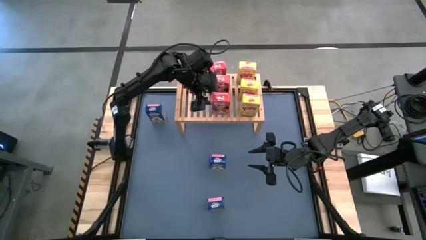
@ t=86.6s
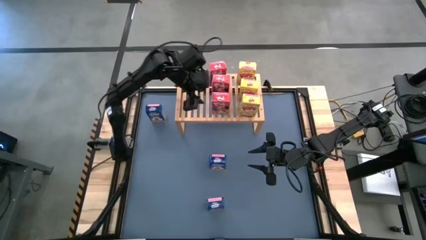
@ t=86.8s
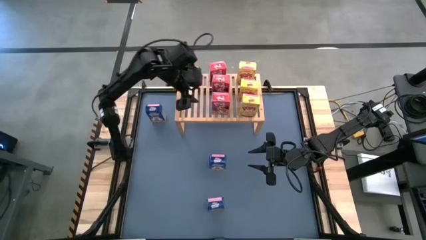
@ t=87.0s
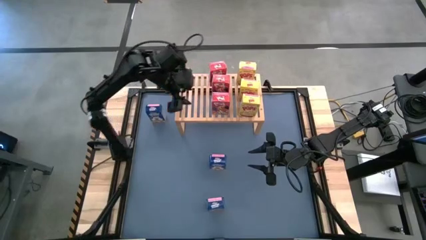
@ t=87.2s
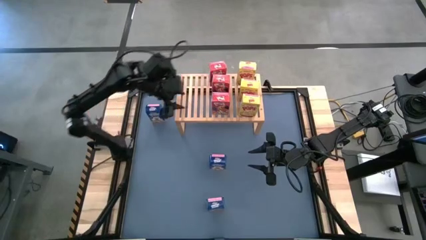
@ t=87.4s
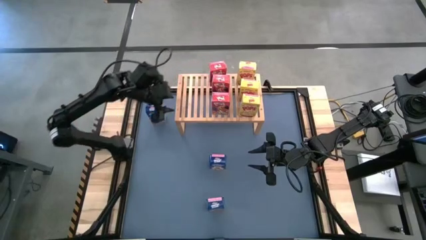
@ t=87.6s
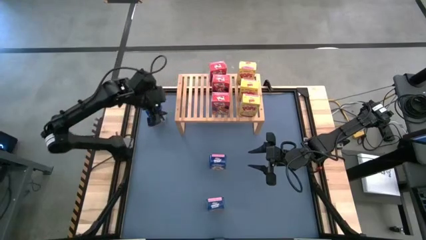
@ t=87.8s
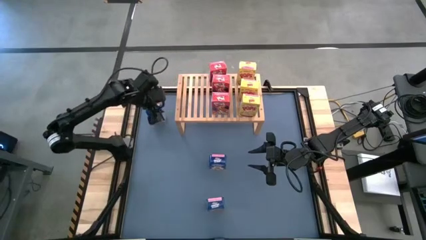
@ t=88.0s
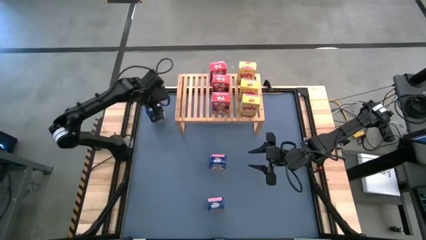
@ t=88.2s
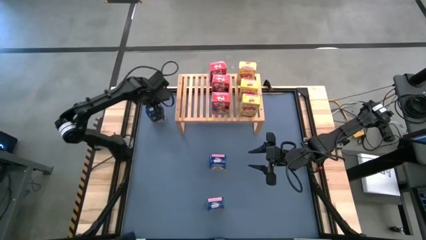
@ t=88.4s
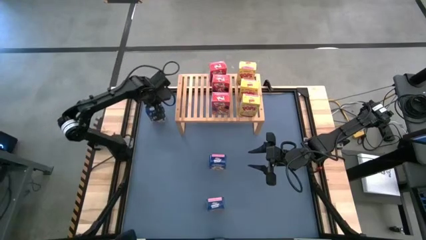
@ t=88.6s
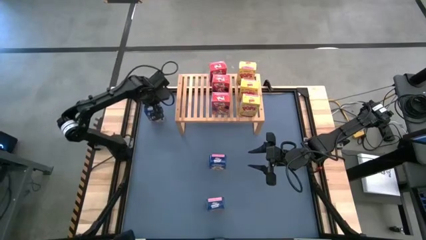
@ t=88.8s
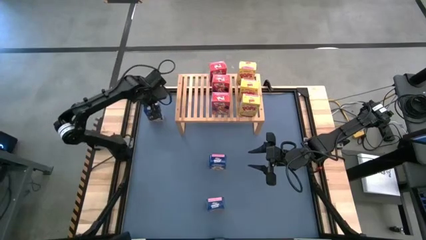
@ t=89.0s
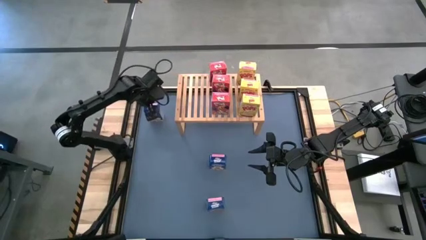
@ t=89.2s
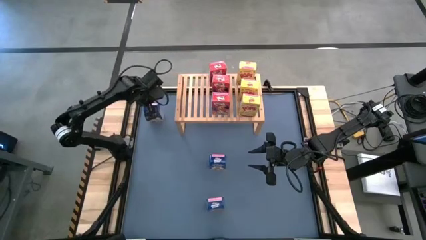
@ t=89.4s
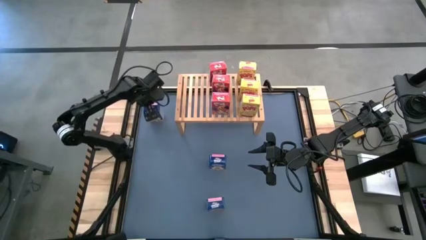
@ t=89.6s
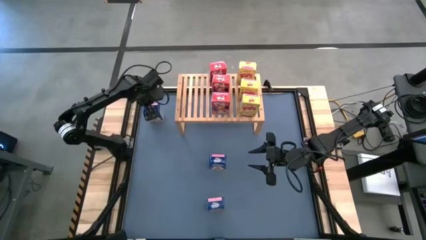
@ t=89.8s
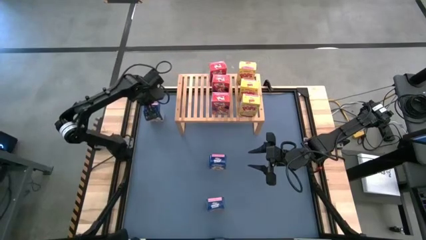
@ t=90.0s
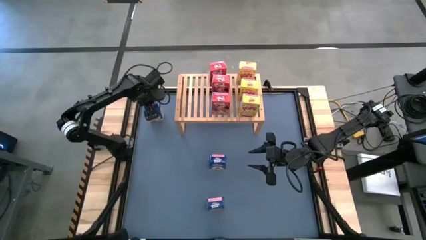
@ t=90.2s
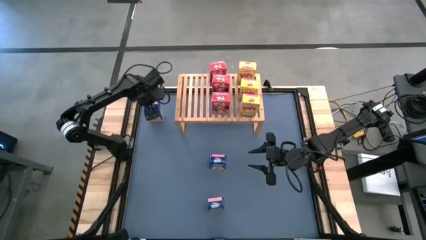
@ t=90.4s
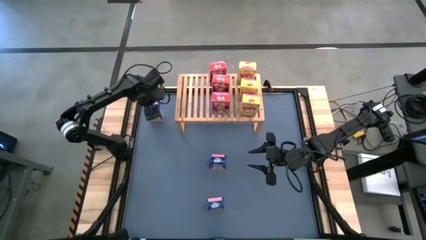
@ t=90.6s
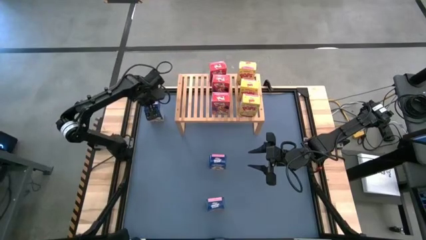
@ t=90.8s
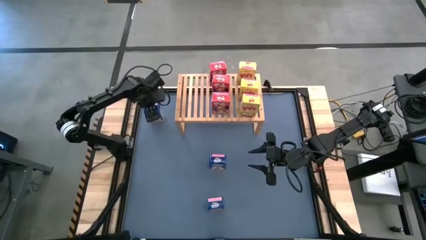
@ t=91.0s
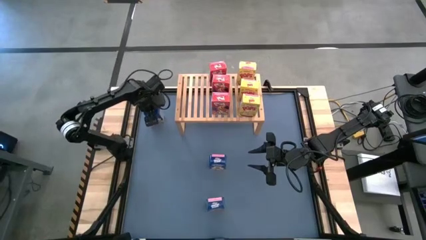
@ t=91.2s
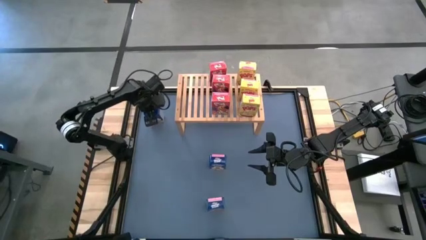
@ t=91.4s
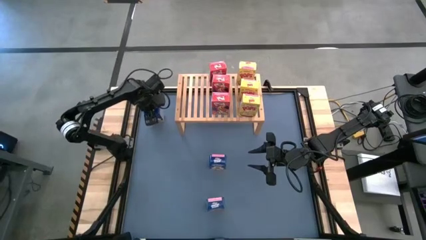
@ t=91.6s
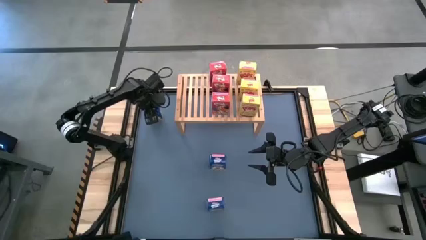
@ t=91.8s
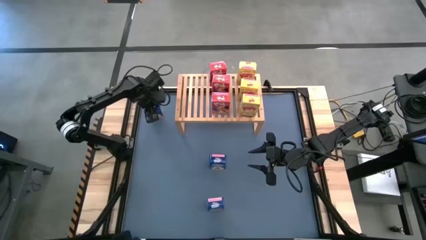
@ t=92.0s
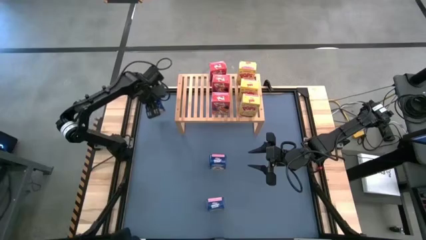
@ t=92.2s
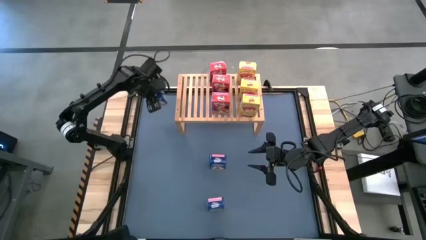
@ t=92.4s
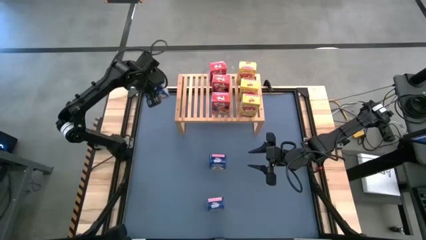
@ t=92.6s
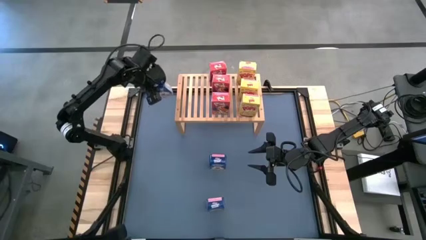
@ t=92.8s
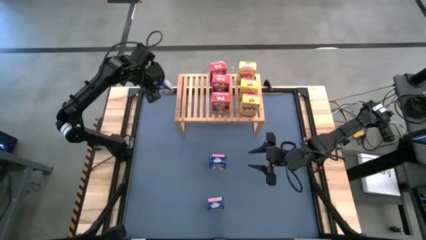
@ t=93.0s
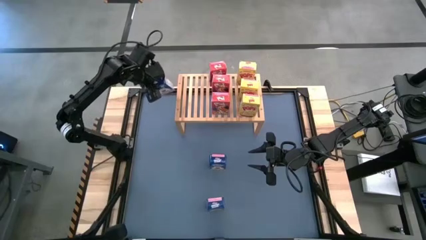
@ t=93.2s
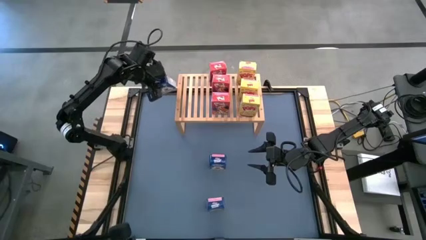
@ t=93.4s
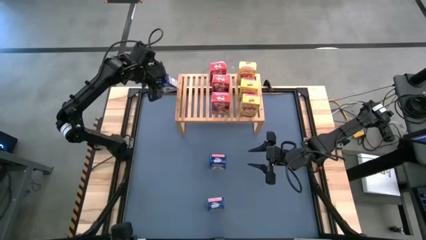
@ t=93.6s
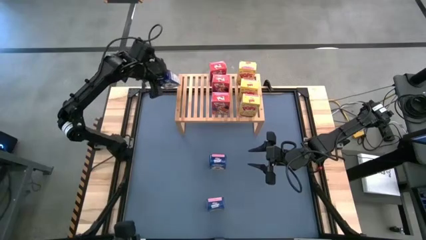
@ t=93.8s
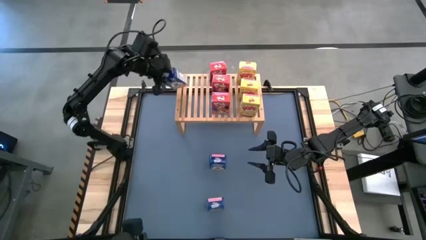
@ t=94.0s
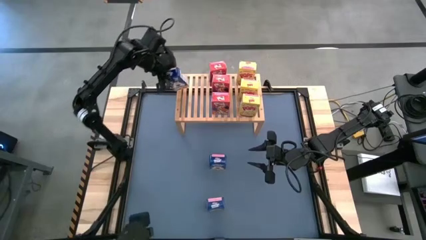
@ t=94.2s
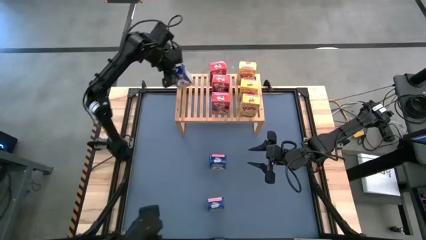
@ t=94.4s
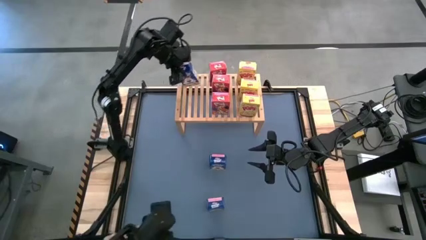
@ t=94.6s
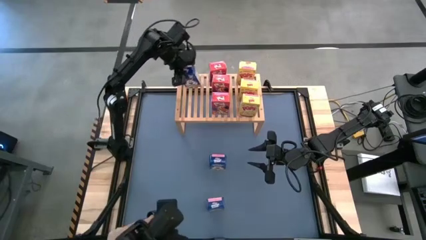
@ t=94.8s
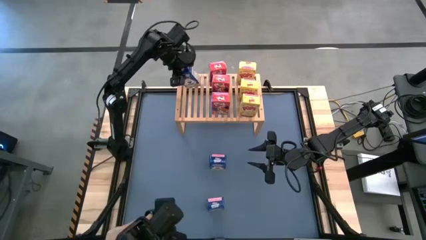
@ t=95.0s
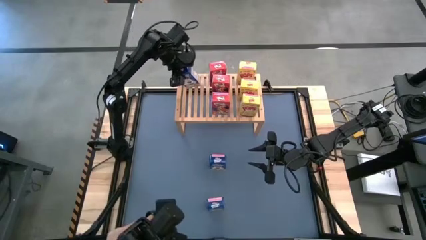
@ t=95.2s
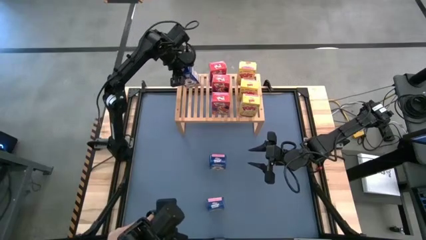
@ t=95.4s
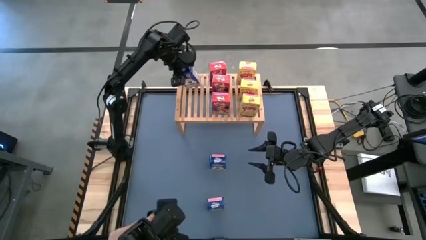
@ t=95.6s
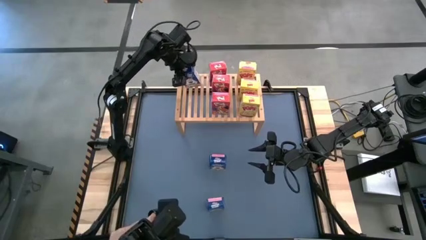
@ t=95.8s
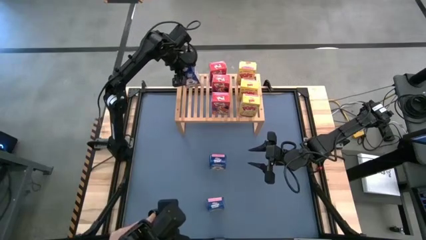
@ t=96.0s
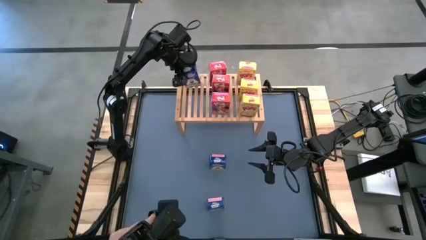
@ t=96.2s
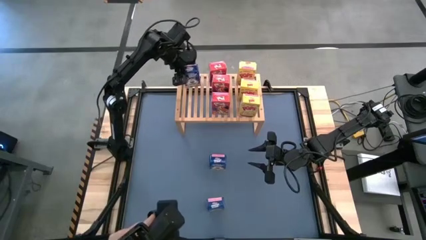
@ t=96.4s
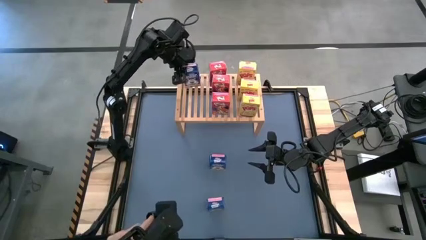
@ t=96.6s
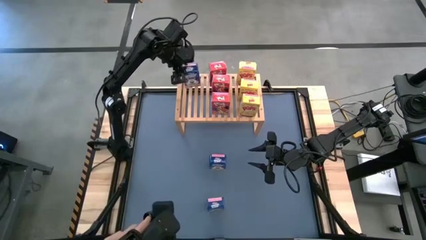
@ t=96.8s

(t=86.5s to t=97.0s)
Task: Stack cereal on shelf
Put the top blue cereal box on the shelf

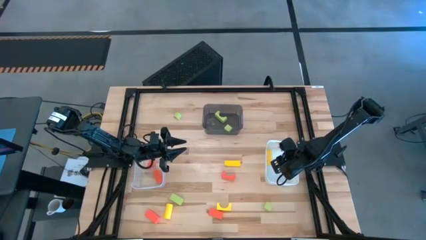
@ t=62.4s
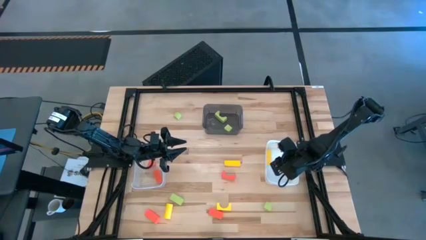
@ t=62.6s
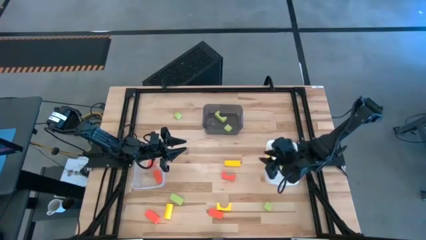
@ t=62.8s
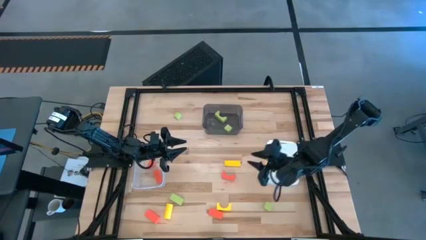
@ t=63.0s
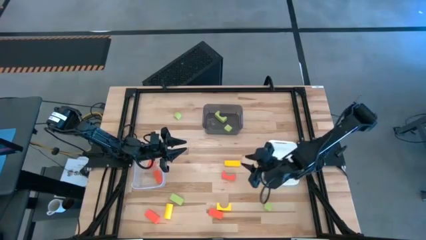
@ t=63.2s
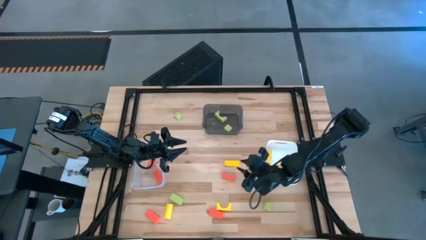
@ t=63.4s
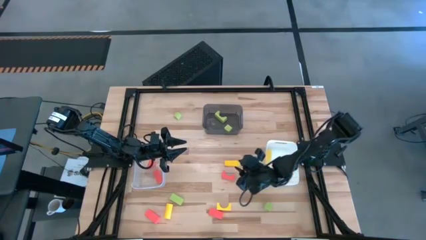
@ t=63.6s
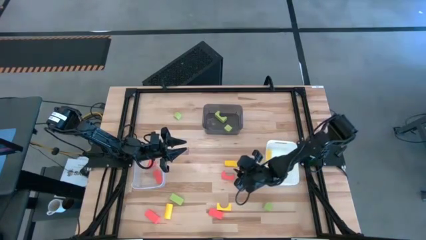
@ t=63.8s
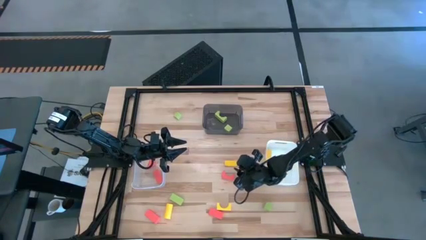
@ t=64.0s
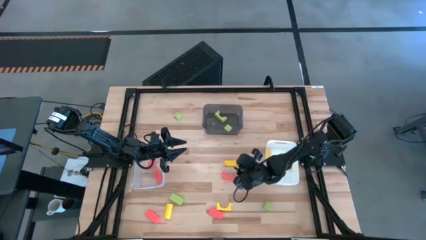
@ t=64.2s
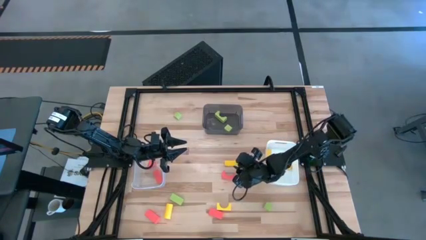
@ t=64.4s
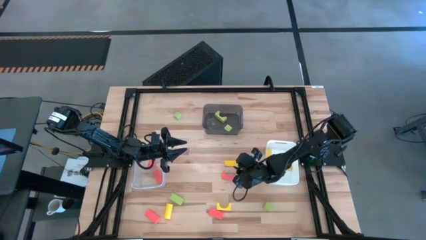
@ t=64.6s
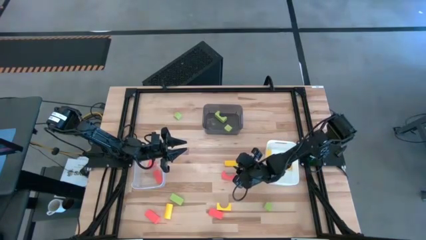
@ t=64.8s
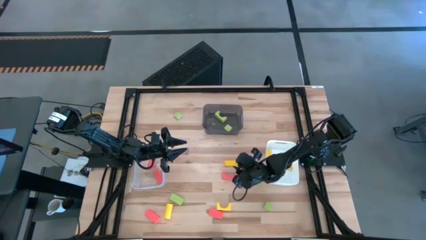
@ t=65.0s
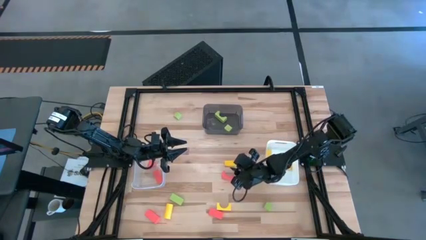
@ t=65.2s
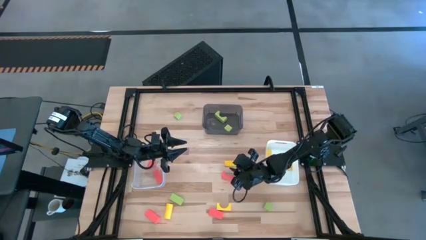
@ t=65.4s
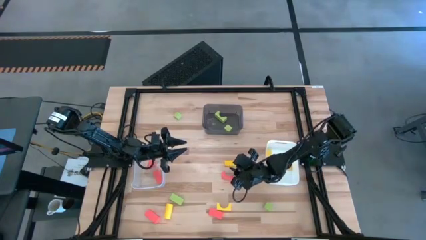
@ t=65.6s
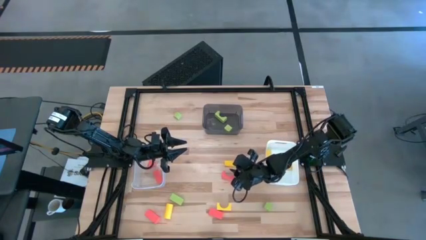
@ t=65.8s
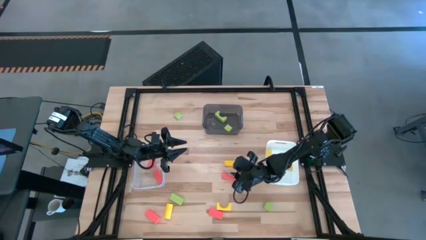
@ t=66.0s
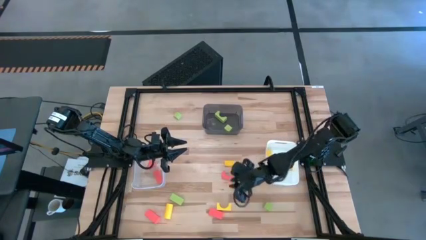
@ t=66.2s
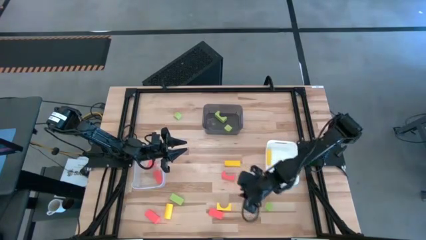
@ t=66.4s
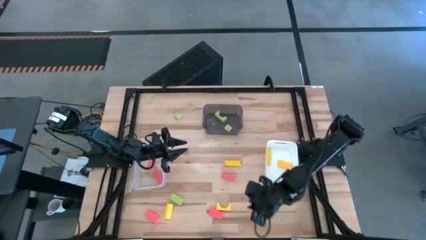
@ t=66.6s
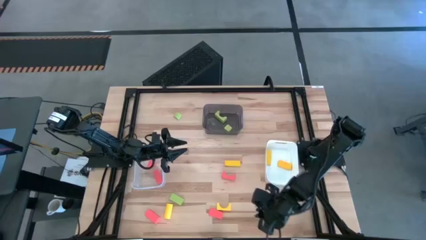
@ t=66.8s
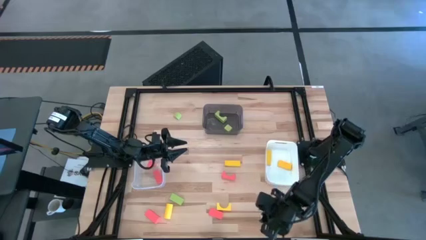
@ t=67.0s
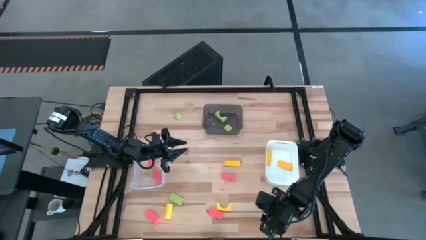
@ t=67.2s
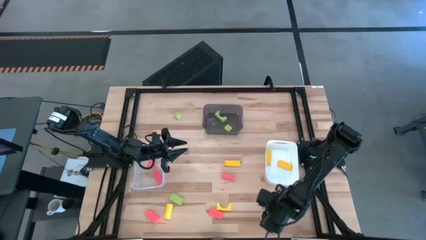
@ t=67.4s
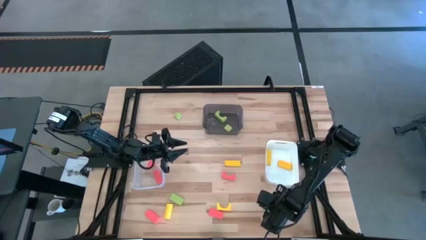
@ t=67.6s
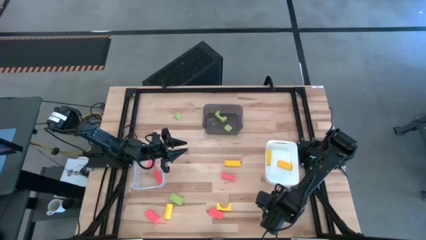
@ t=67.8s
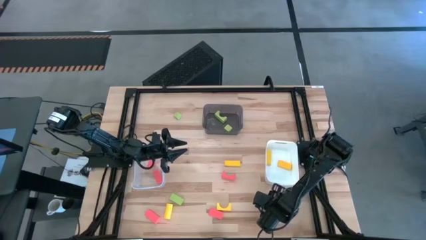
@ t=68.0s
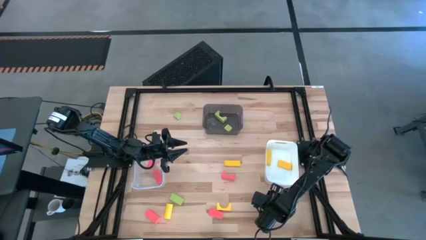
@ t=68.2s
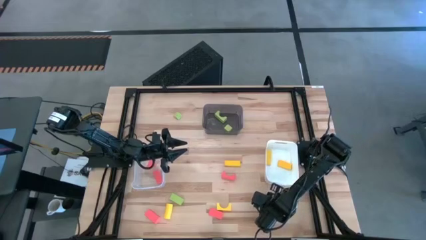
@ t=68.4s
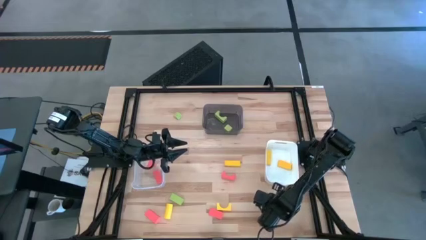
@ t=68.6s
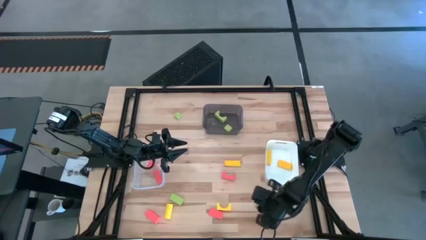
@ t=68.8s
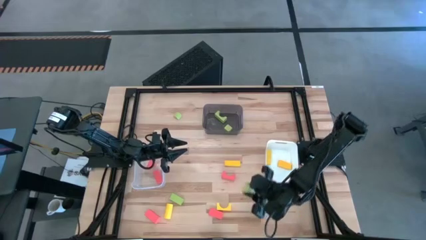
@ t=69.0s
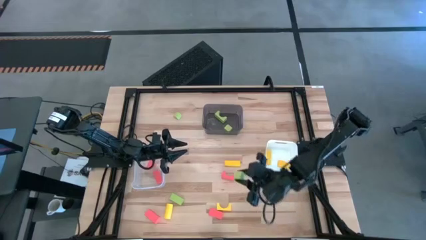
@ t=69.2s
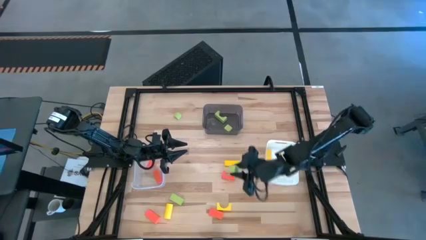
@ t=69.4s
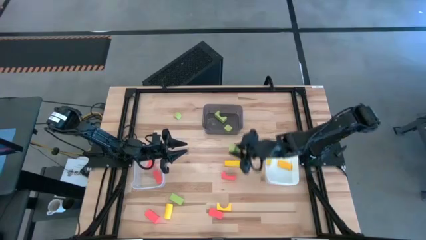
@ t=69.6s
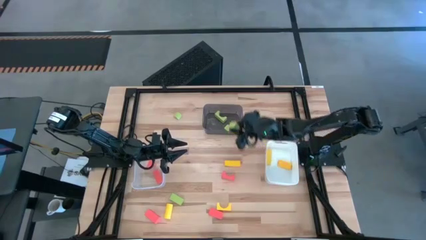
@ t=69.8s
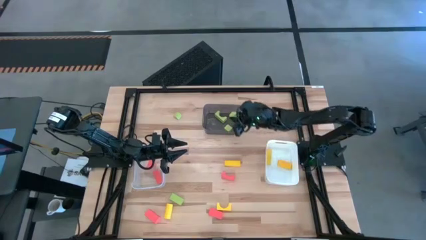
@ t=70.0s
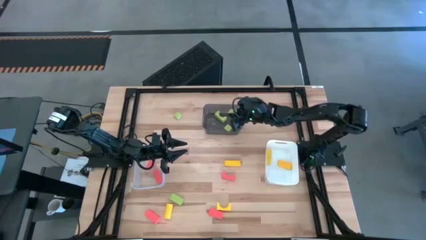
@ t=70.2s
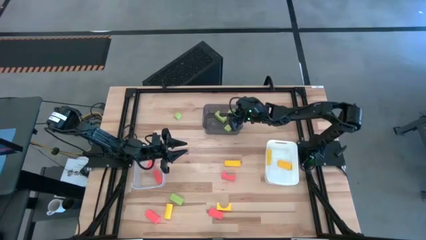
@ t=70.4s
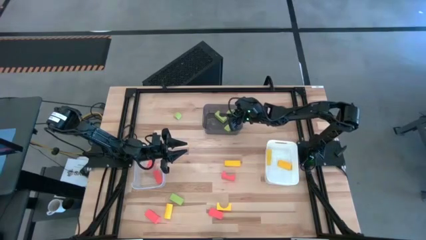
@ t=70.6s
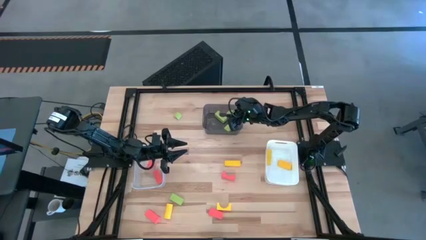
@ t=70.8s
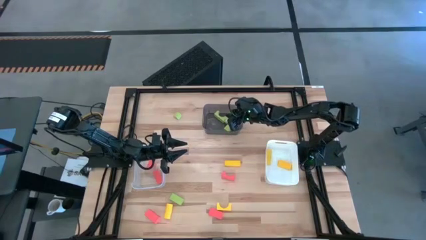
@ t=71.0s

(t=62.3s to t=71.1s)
Task: Sort & place blocks by color
Put the green block into the black bin
